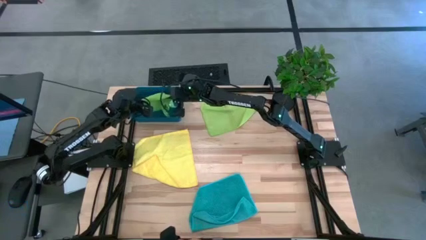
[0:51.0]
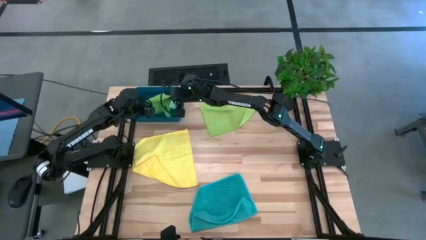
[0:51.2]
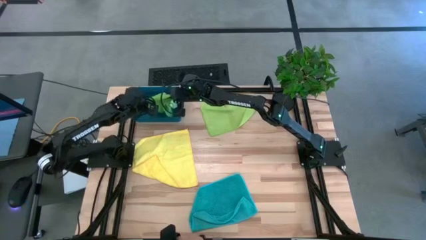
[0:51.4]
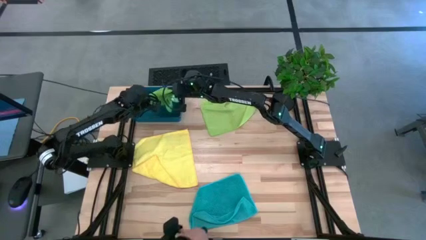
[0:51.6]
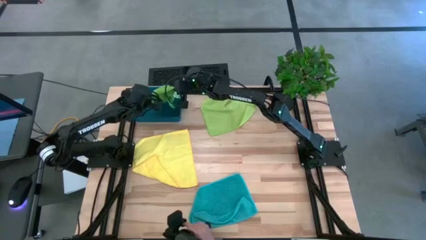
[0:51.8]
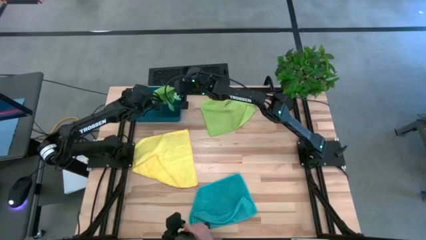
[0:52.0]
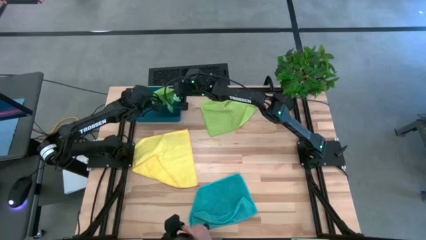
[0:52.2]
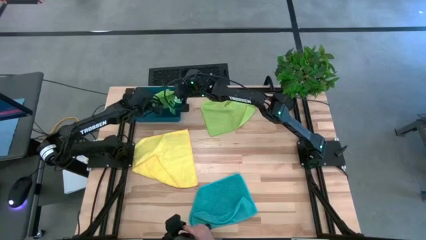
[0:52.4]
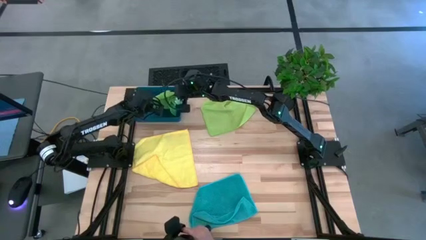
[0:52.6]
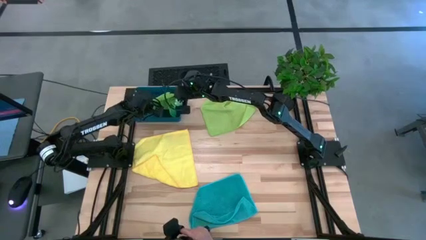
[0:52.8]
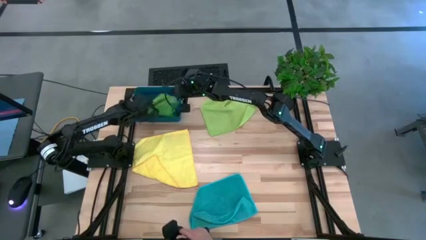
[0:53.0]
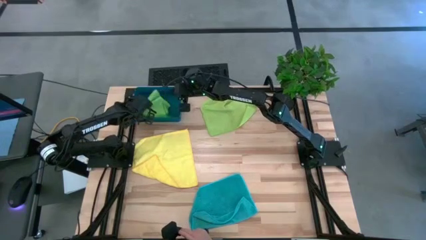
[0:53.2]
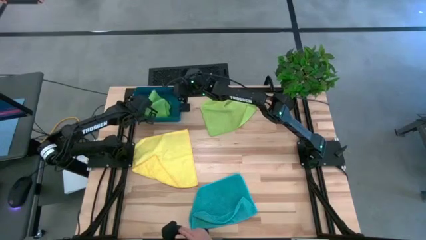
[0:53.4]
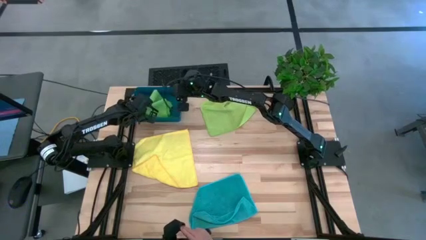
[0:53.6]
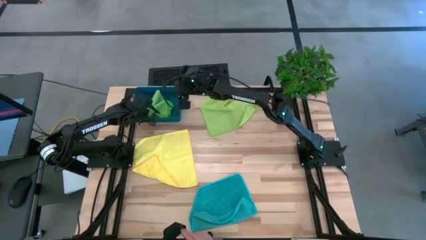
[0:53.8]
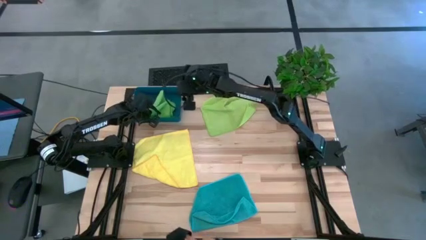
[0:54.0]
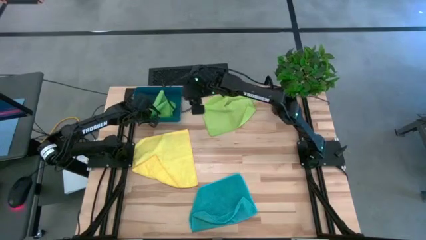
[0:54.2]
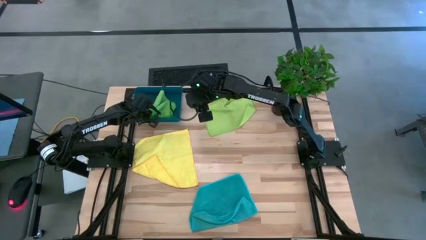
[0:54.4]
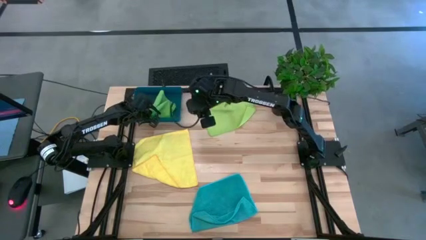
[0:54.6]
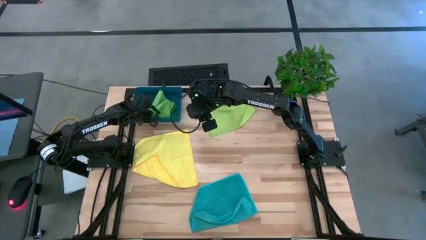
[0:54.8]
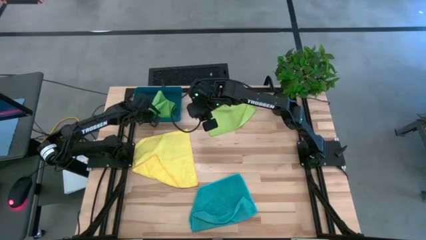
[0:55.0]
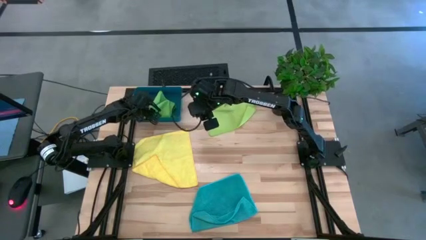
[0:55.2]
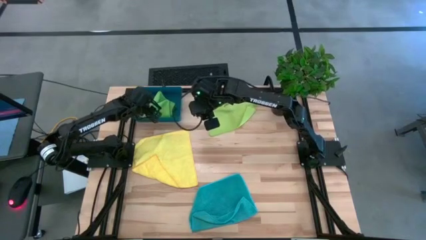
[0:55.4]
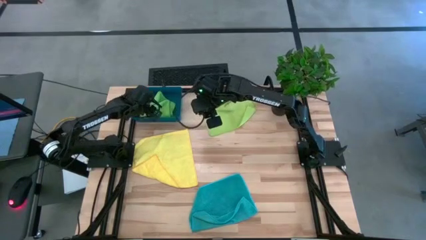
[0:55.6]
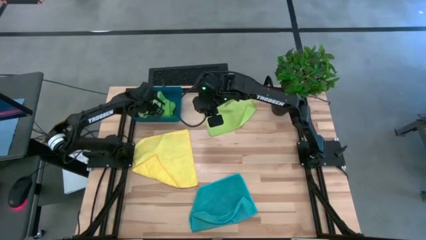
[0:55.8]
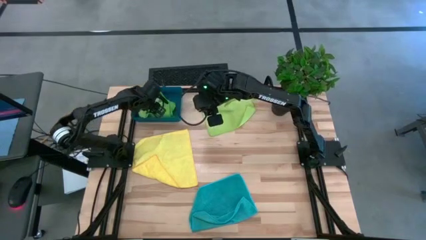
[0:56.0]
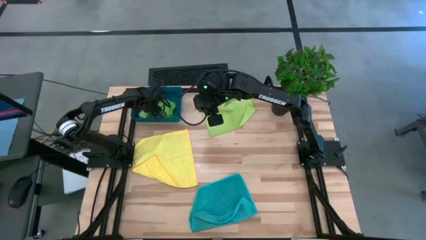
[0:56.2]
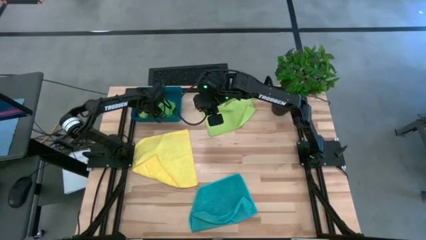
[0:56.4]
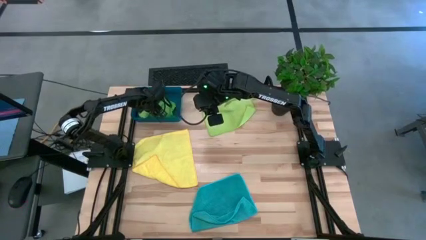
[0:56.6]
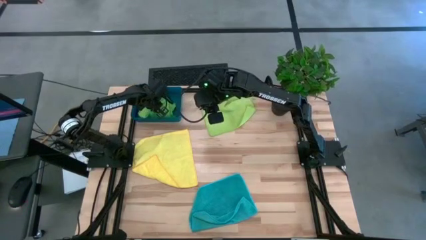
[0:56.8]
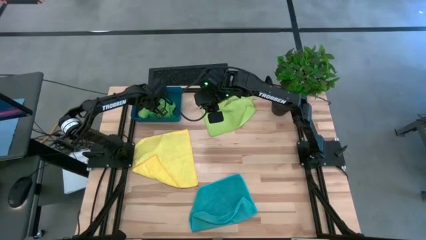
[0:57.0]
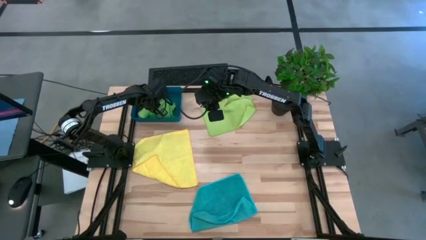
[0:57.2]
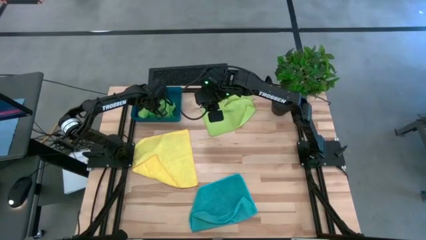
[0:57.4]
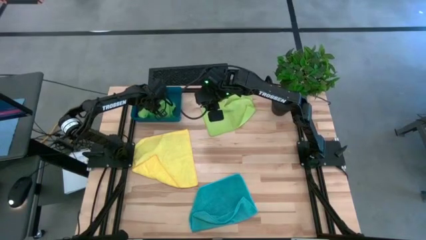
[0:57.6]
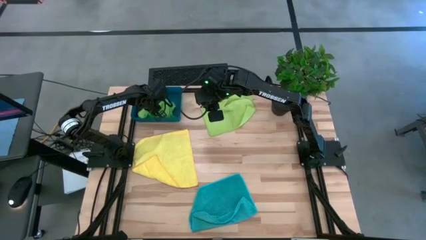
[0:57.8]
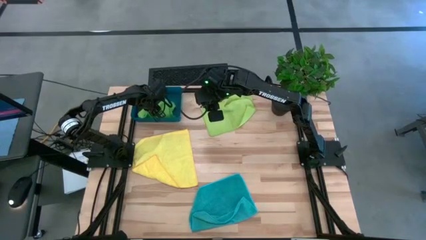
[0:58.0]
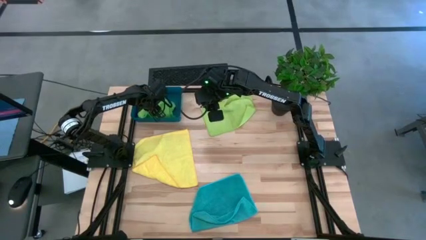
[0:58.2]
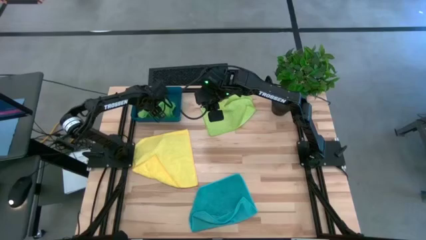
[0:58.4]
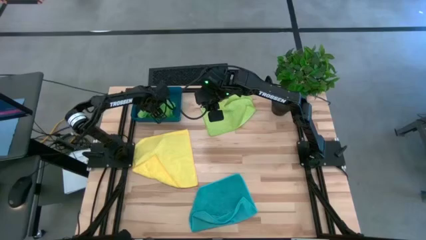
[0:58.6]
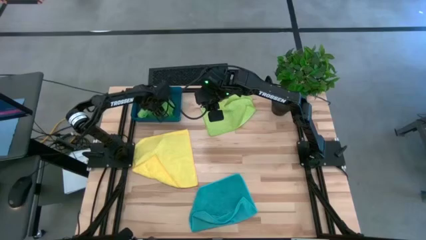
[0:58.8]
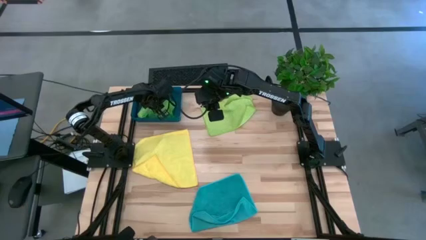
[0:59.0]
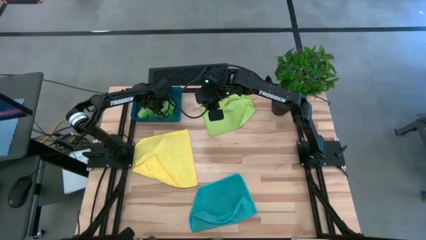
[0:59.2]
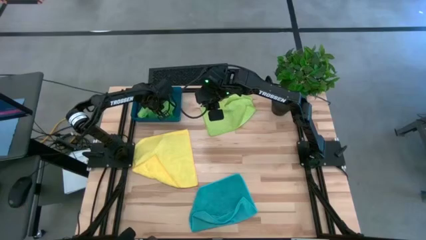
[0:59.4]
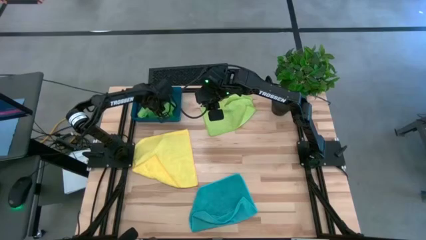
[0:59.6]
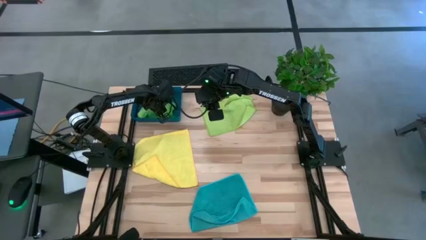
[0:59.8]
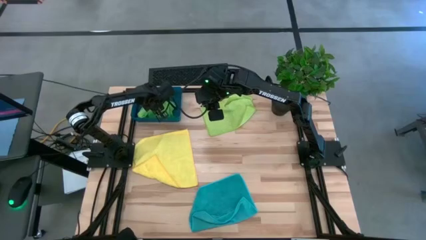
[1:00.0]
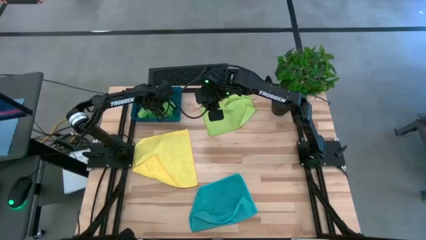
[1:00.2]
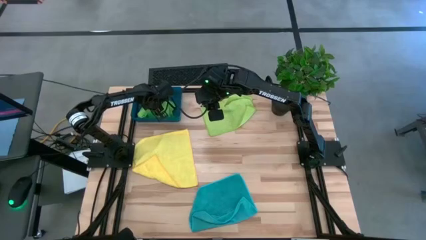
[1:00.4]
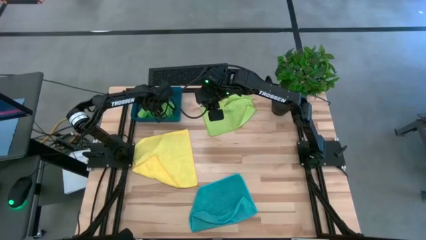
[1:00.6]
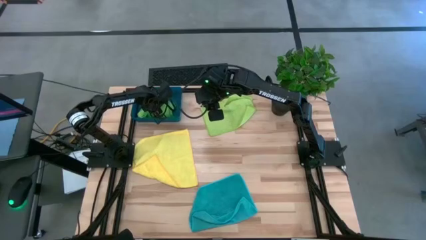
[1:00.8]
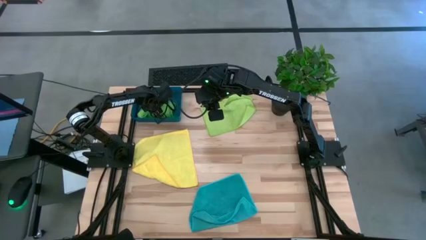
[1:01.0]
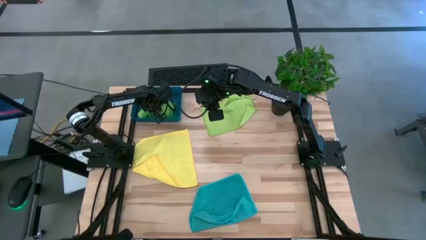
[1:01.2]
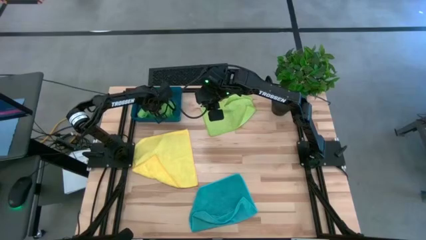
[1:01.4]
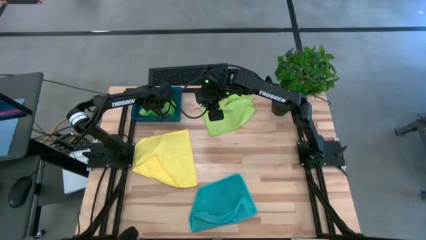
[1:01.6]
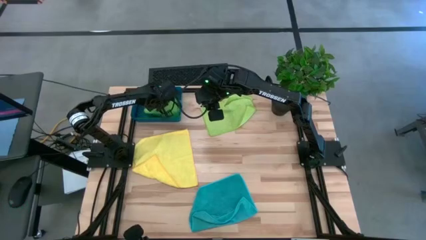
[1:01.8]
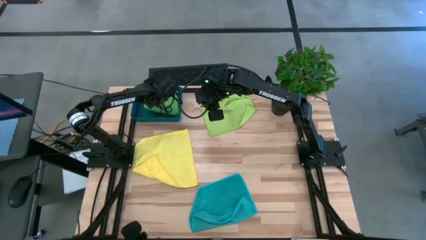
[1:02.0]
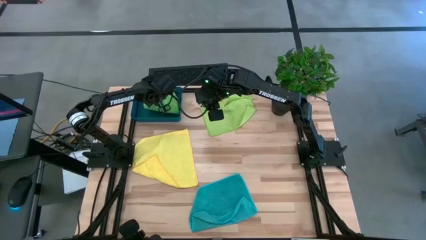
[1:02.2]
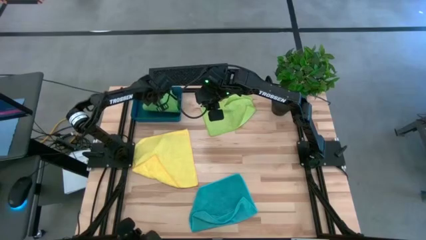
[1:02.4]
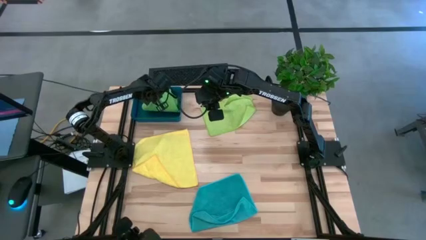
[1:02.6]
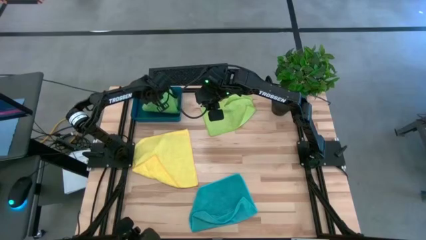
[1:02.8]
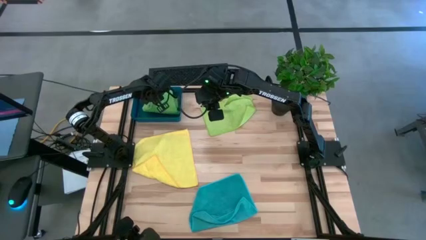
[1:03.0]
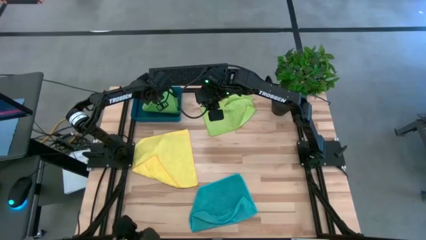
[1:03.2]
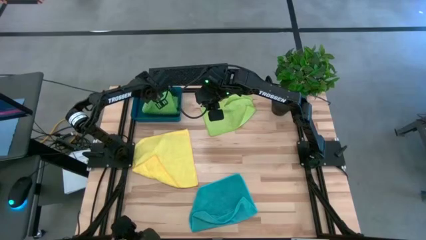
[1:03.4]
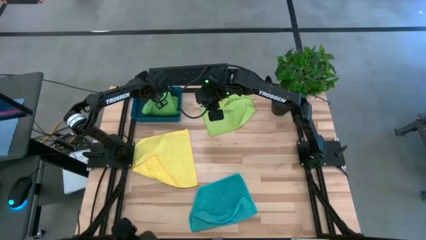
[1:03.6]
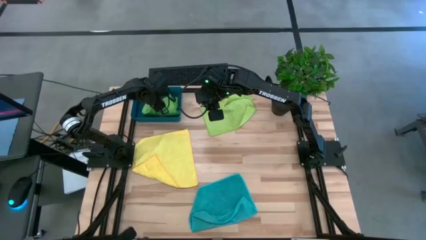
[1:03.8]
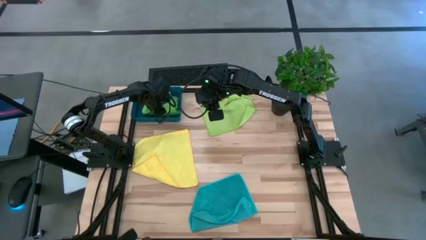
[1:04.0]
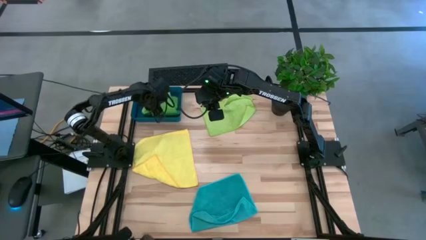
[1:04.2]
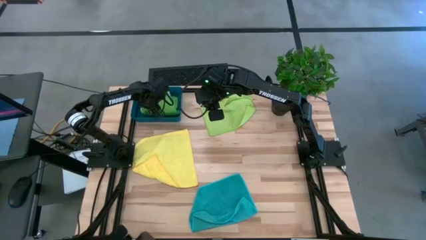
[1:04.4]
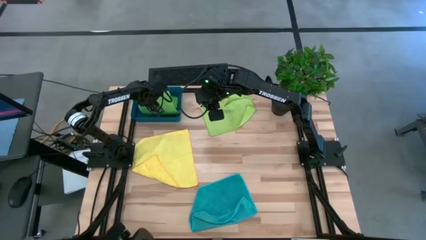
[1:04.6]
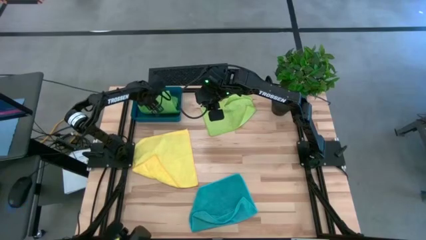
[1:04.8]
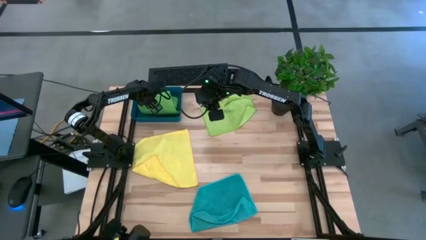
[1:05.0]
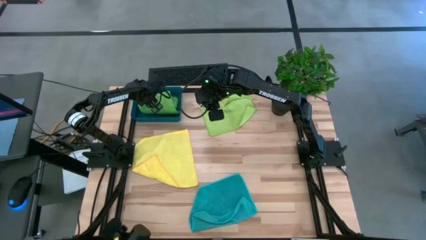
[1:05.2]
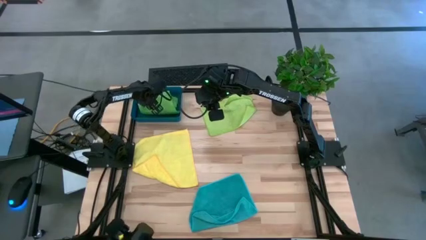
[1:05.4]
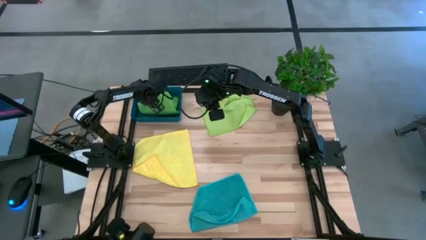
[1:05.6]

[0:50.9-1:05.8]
Task: Fold microfiber towels
Put the green towel into the blue bin
